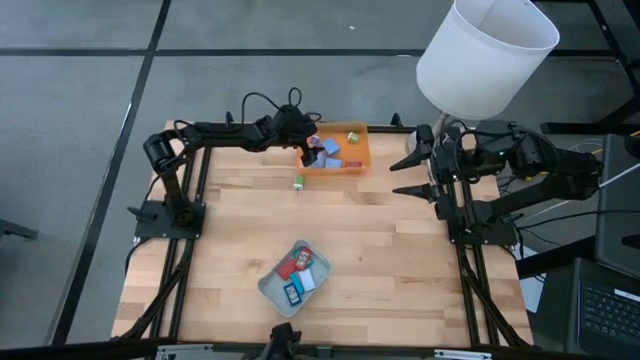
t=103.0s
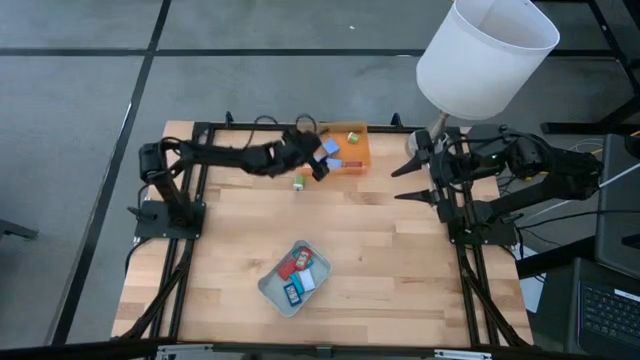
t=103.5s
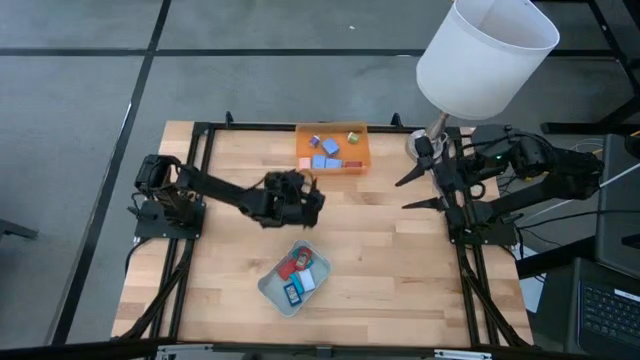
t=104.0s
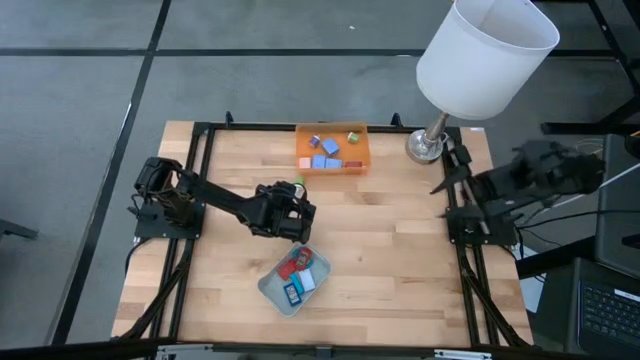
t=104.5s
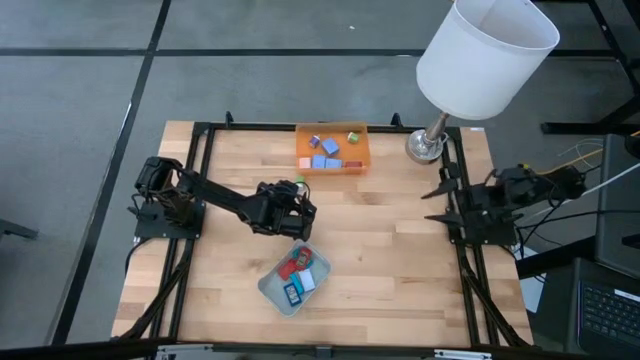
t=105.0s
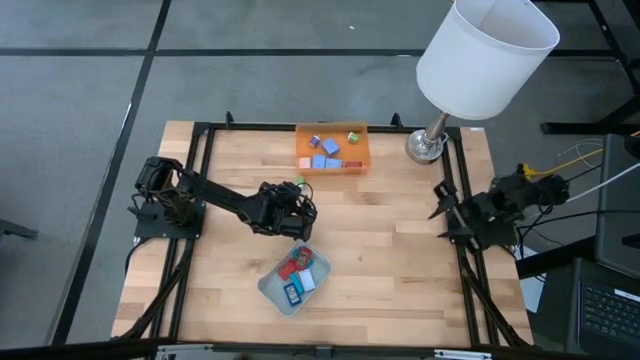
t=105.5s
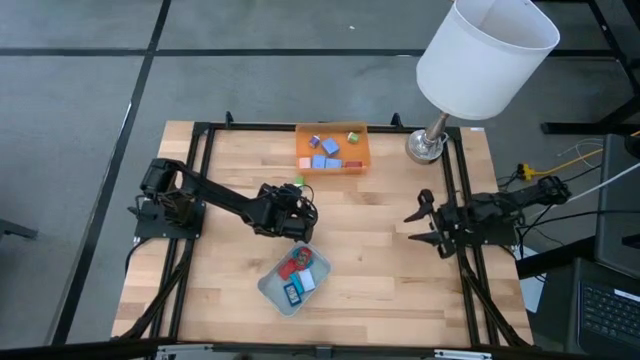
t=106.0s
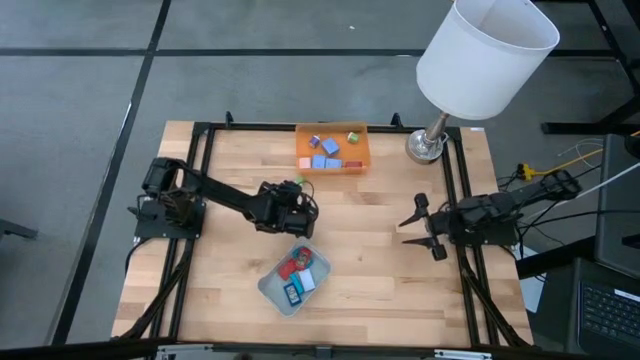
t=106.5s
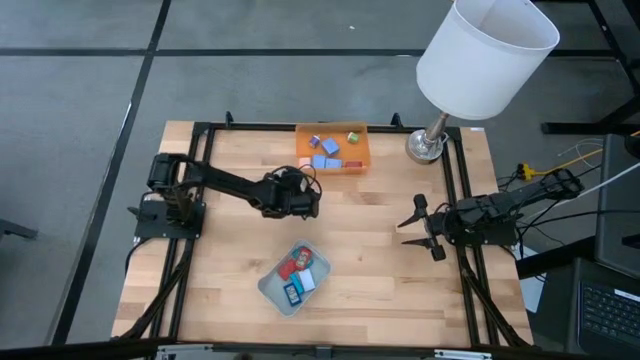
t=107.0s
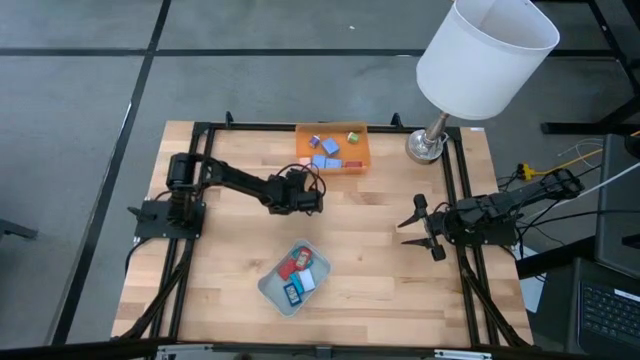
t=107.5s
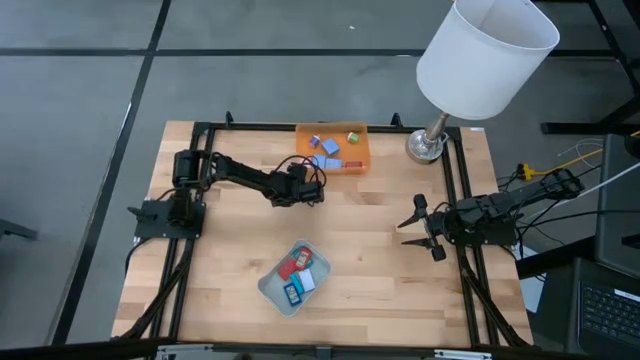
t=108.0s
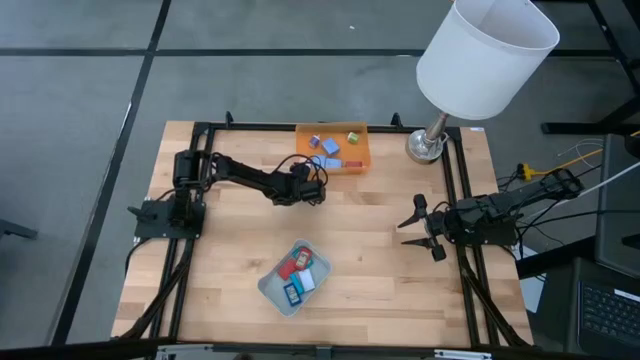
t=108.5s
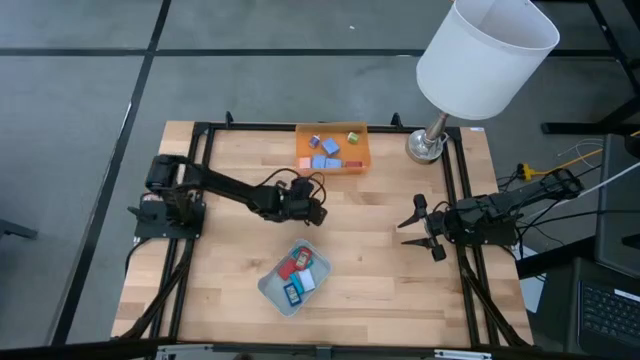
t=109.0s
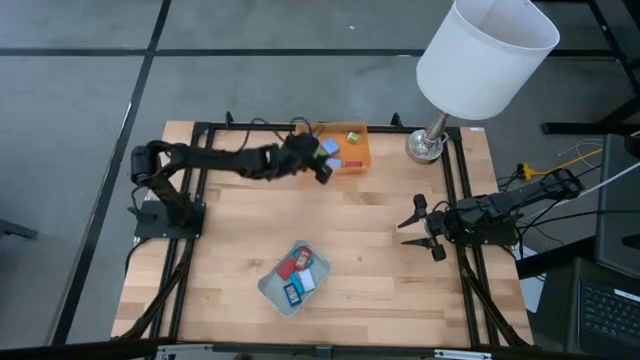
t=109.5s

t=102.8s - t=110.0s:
Task: Pick & Place Office items
Put the green charger adapter into the orange bin

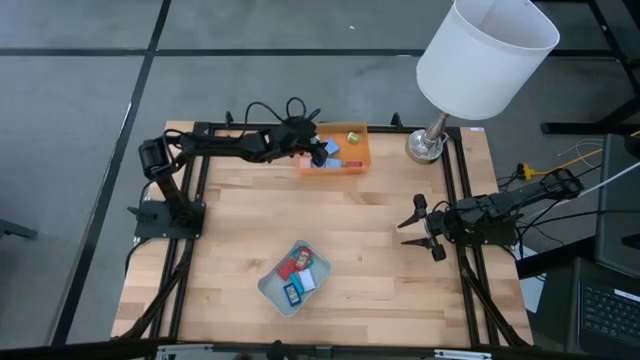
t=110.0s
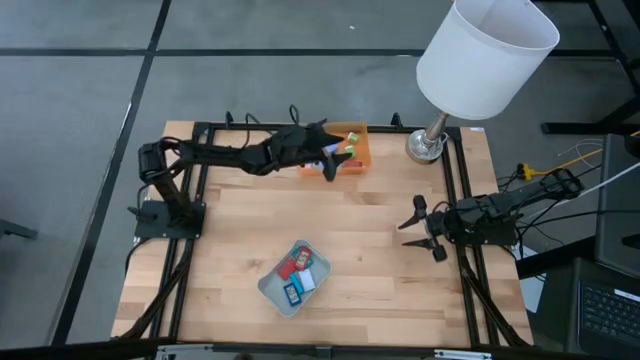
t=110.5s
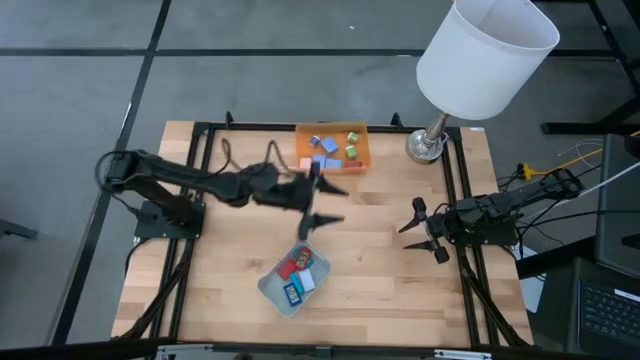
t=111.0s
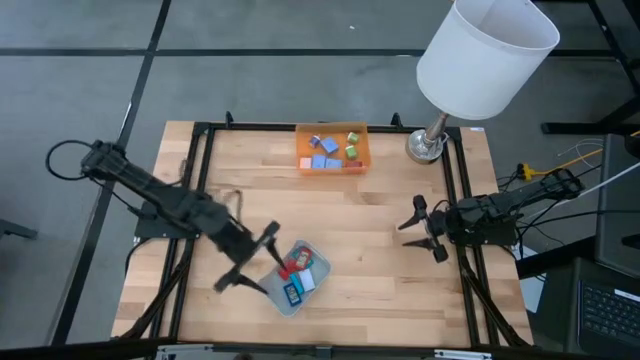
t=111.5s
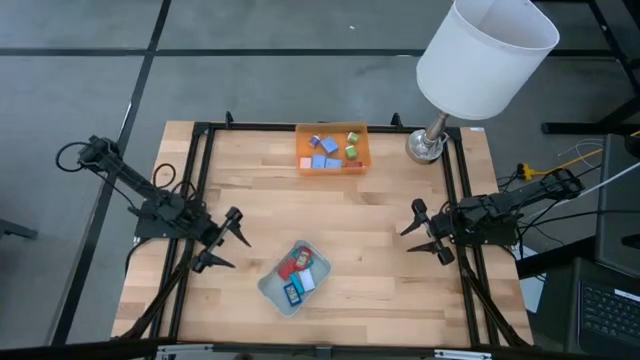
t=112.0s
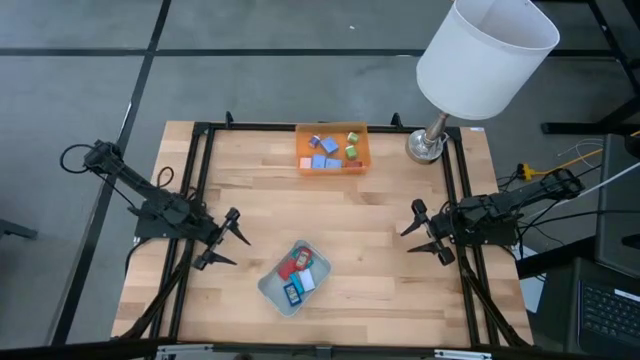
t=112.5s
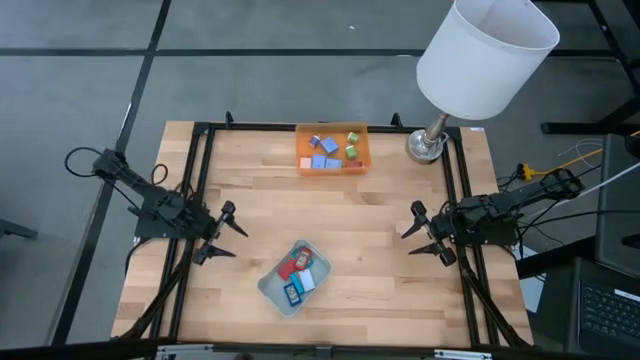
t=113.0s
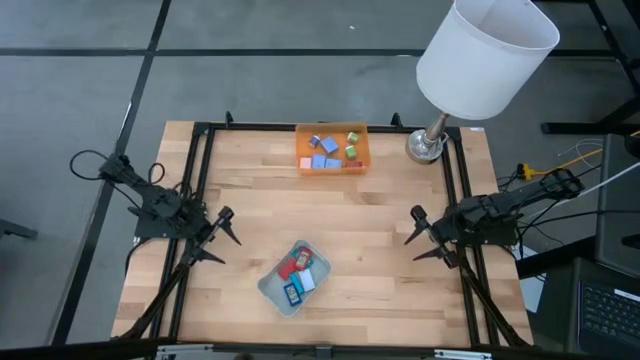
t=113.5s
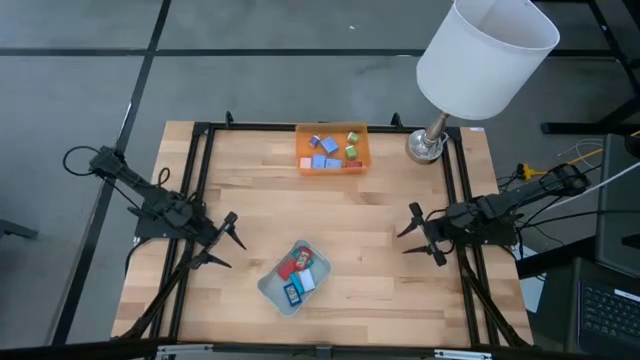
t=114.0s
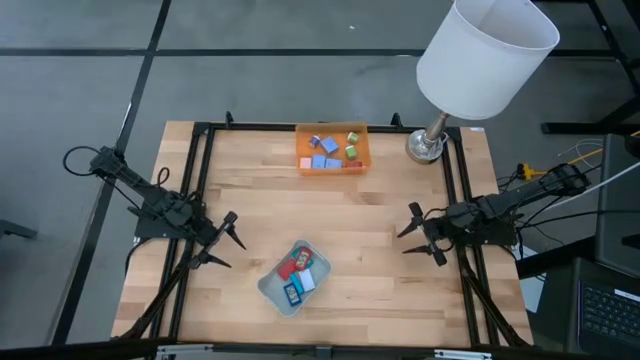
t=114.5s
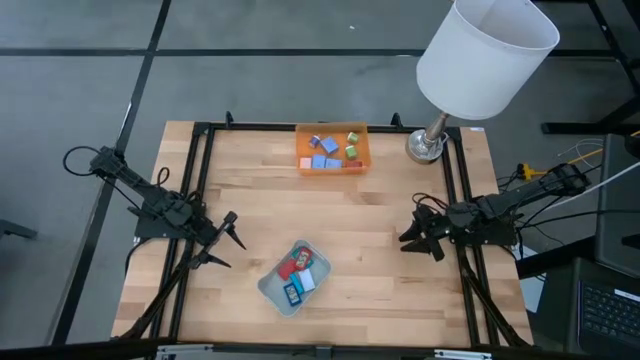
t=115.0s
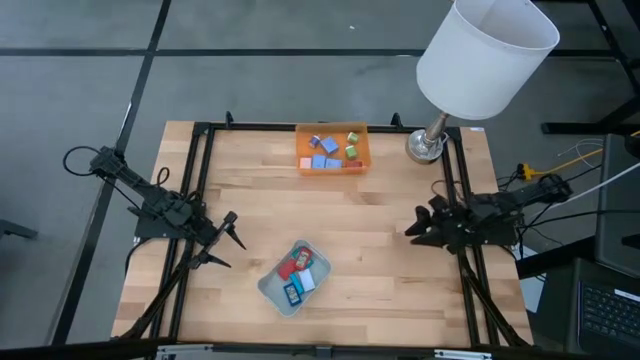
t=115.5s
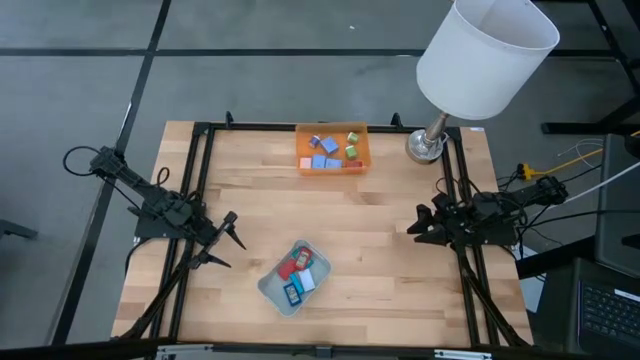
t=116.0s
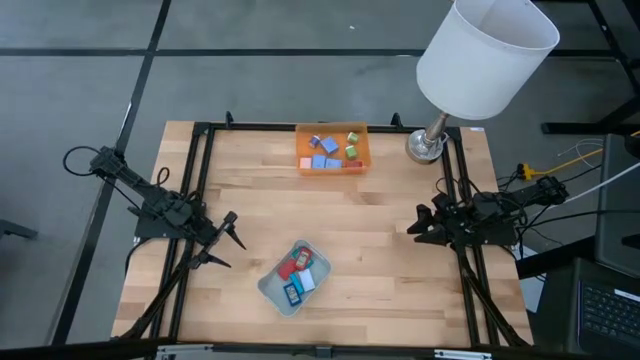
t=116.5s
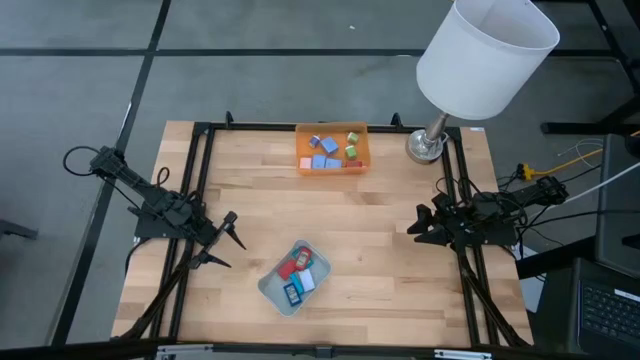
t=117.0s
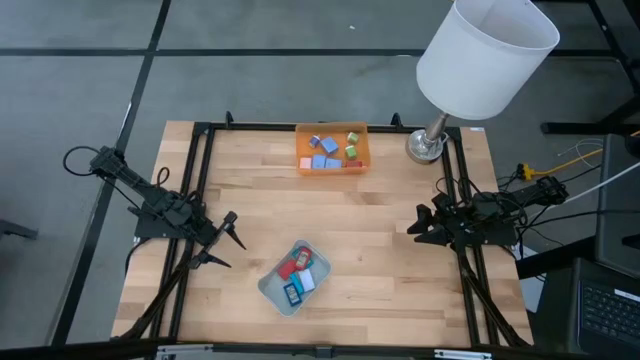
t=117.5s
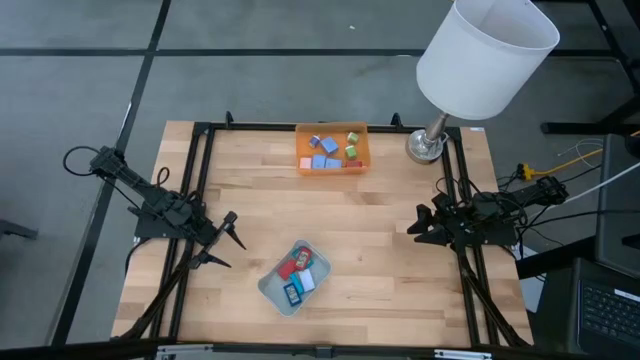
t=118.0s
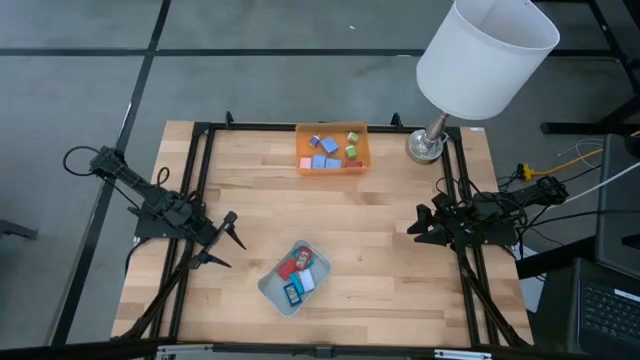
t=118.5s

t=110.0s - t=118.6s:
Return to Home Position

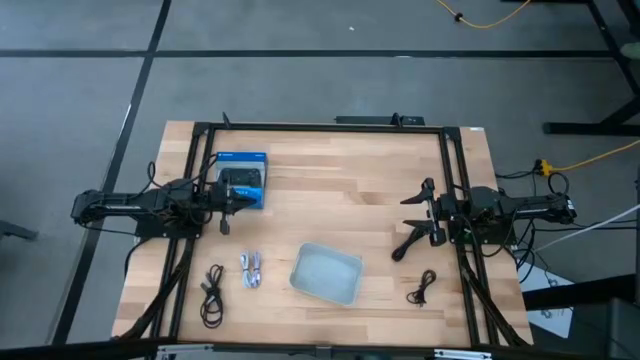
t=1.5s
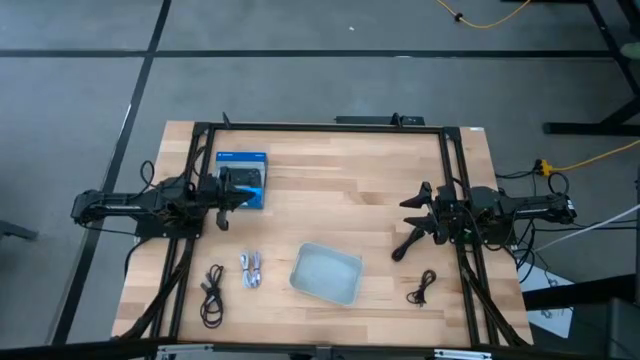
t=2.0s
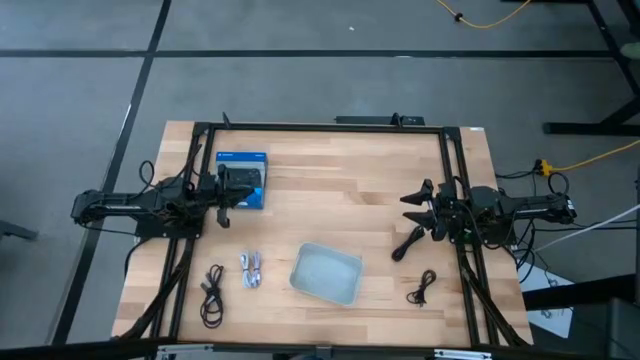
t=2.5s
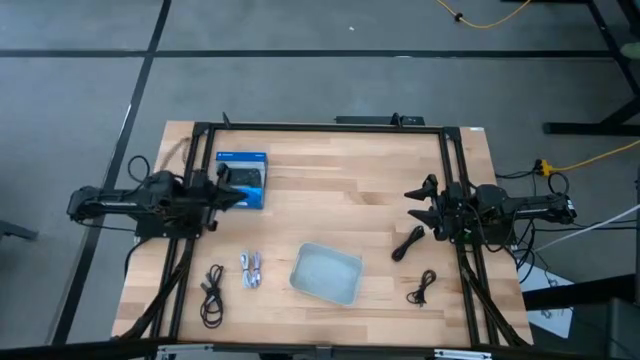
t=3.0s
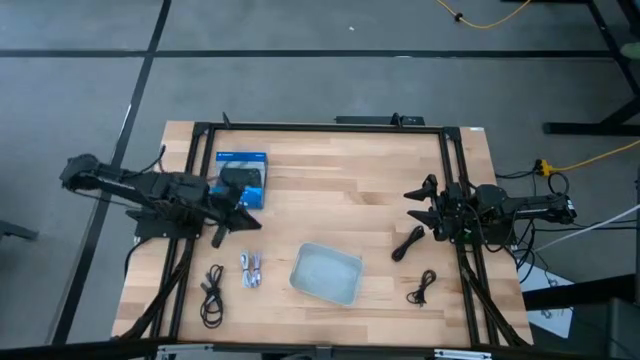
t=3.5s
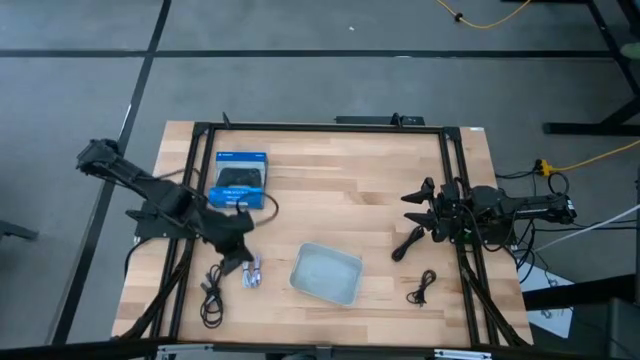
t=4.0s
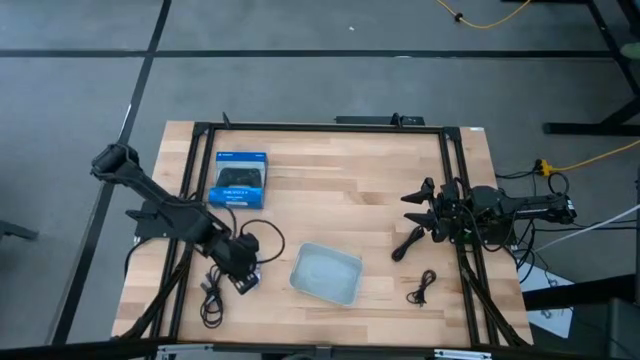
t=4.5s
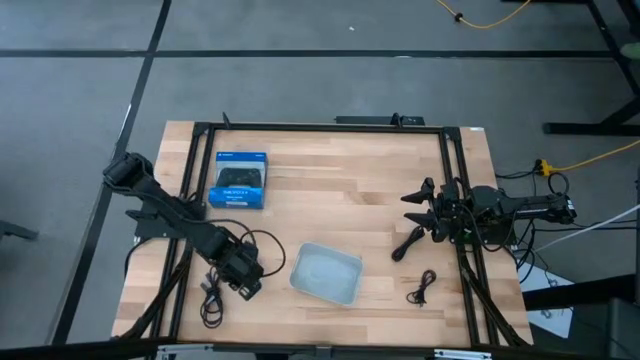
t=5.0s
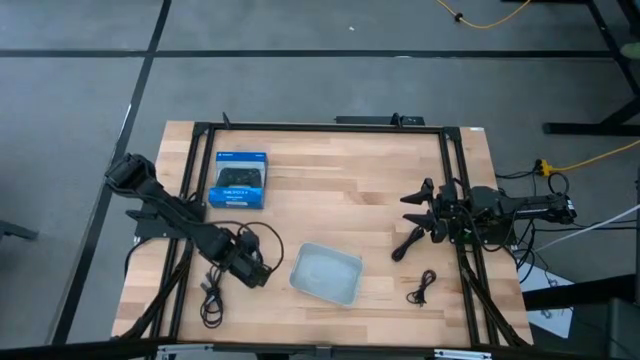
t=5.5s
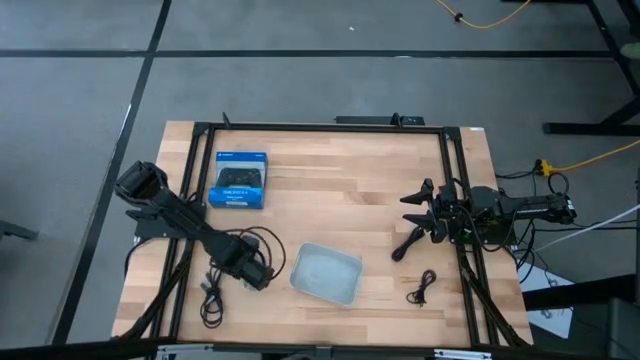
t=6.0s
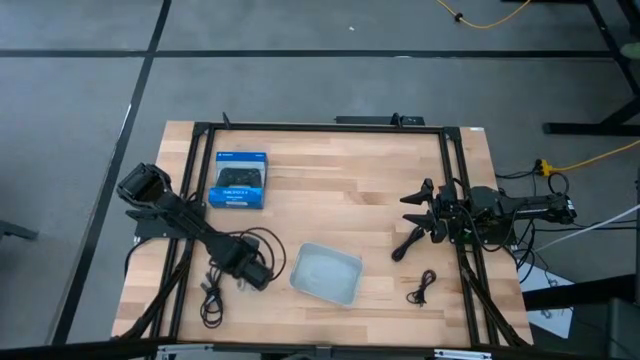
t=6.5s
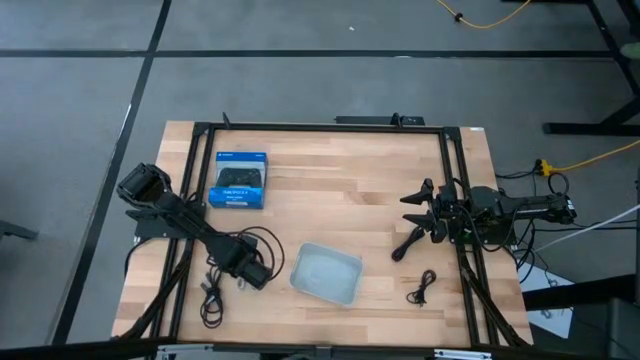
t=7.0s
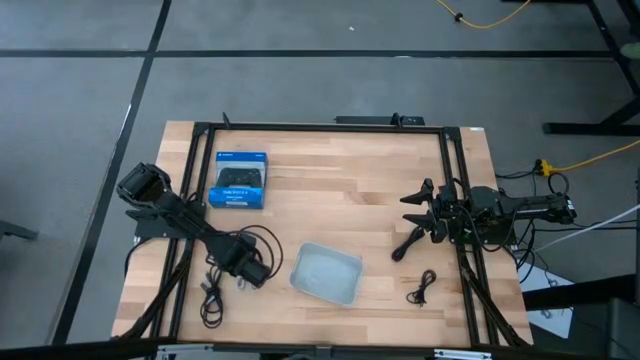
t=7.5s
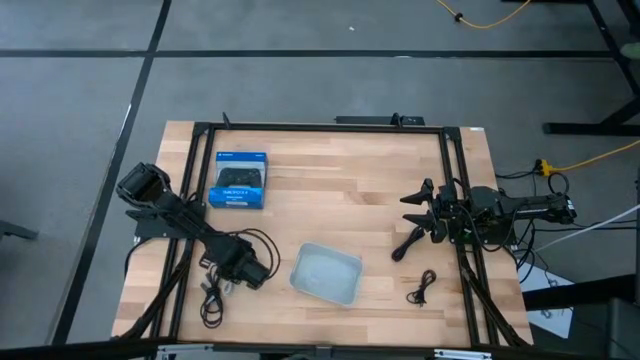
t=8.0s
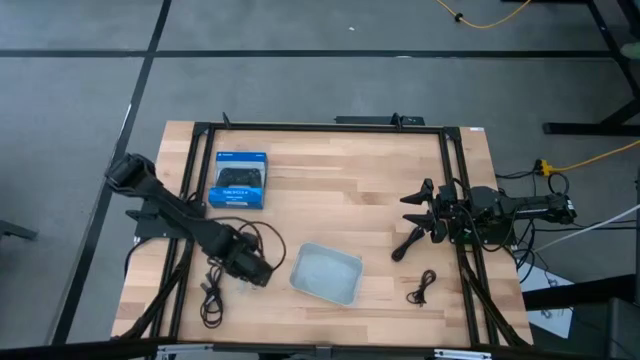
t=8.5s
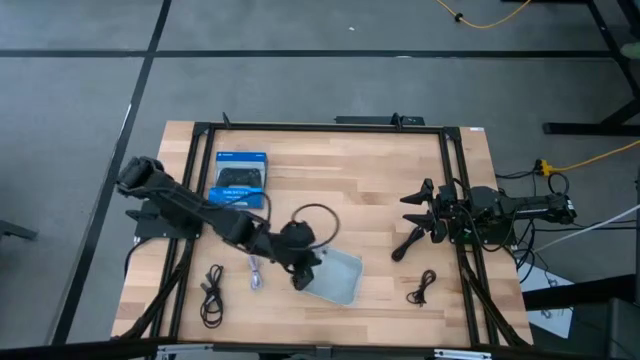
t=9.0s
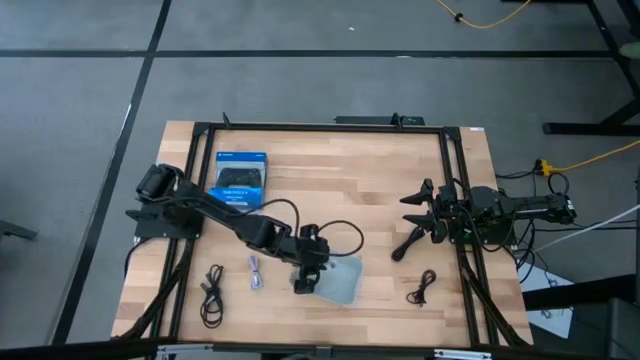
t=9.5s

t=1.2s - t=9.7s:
Task: Pick and place USB-C Cables
Put the light blue charger cable into the gray bin
